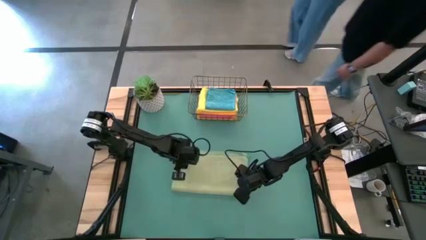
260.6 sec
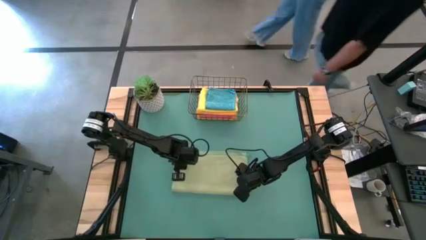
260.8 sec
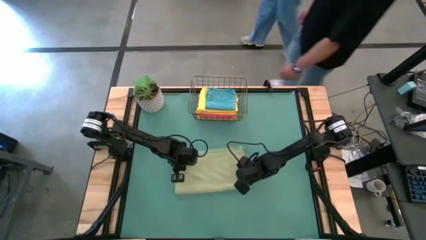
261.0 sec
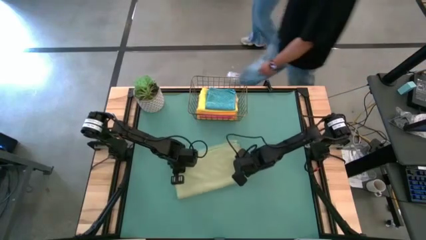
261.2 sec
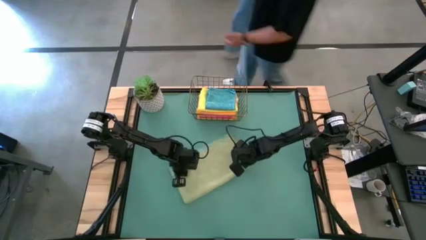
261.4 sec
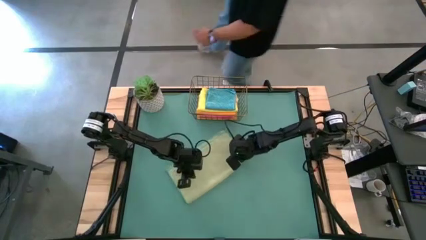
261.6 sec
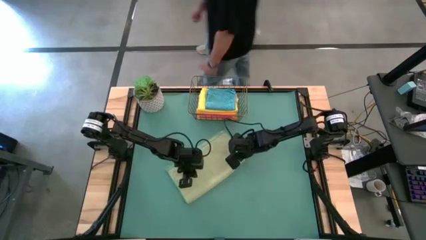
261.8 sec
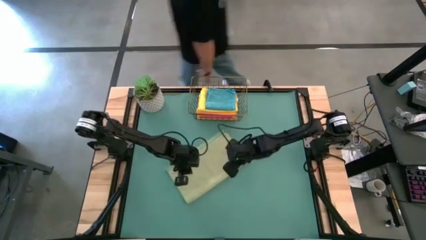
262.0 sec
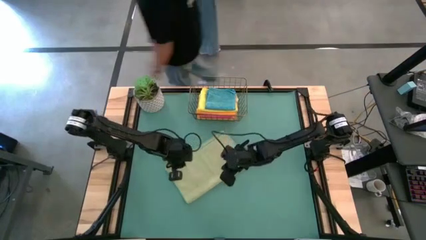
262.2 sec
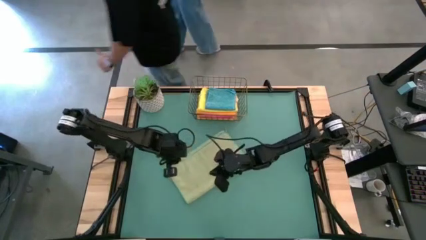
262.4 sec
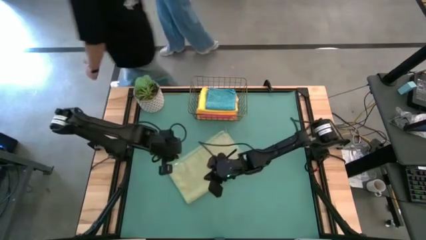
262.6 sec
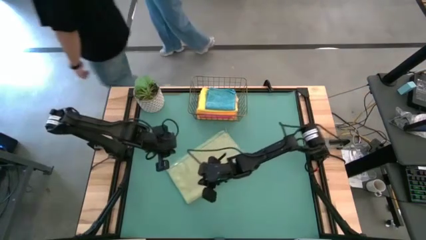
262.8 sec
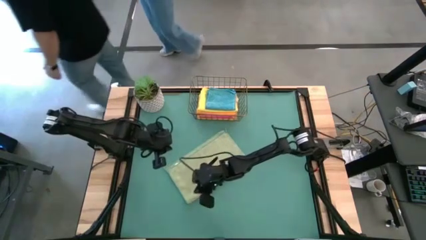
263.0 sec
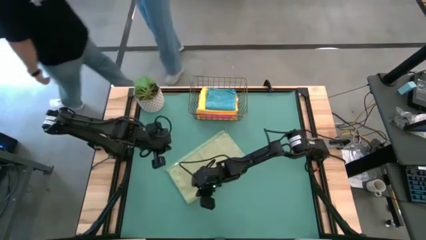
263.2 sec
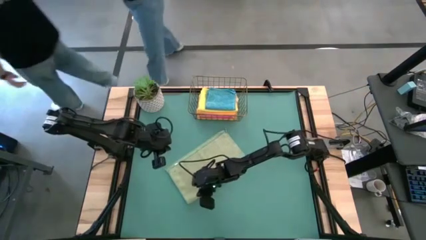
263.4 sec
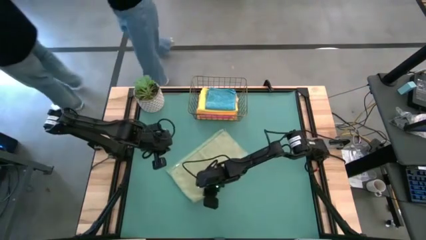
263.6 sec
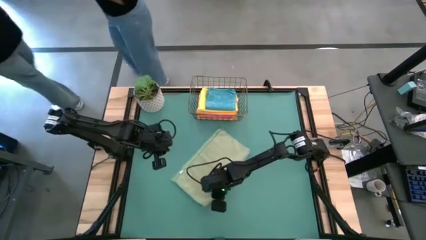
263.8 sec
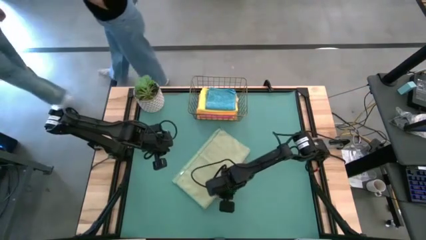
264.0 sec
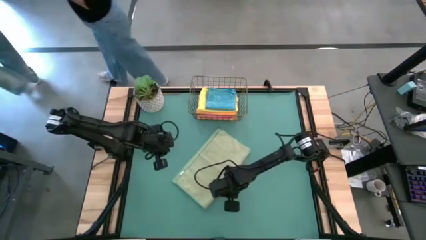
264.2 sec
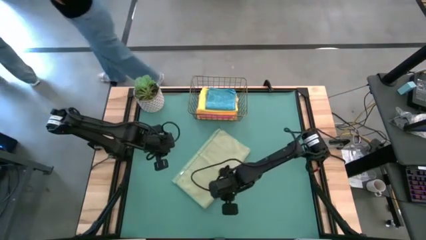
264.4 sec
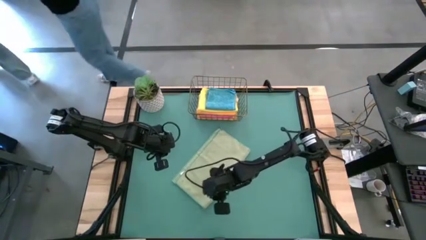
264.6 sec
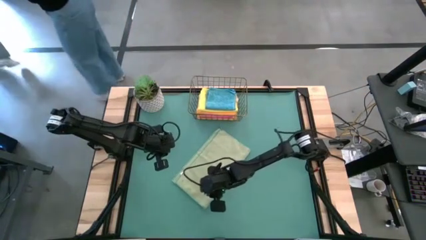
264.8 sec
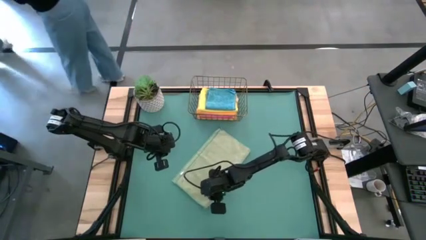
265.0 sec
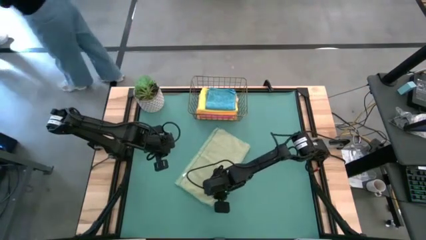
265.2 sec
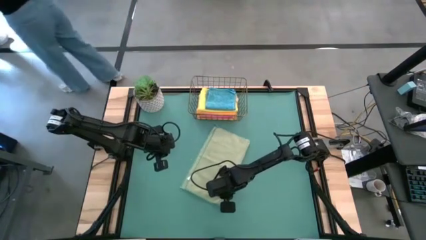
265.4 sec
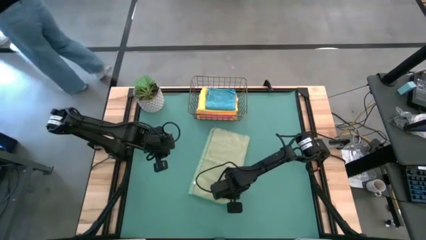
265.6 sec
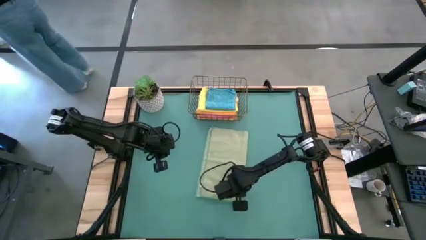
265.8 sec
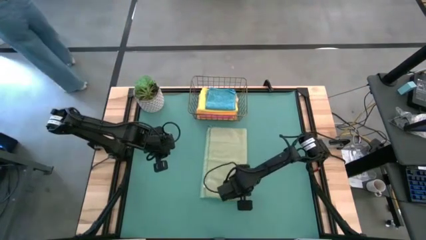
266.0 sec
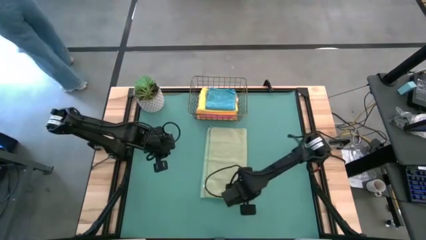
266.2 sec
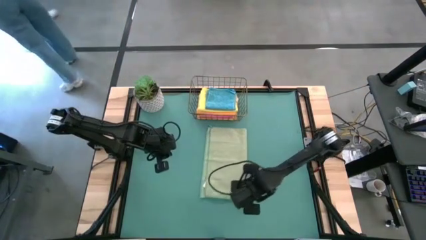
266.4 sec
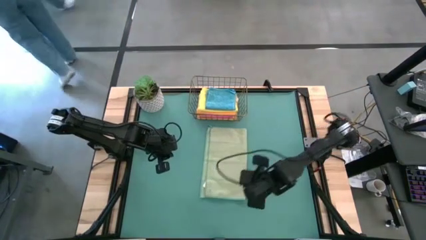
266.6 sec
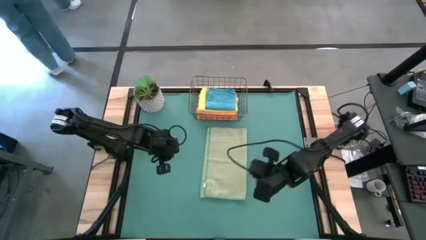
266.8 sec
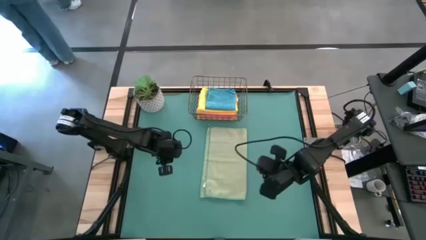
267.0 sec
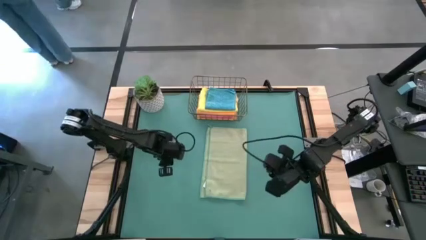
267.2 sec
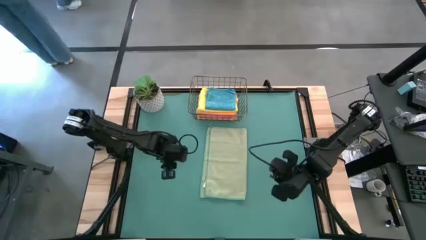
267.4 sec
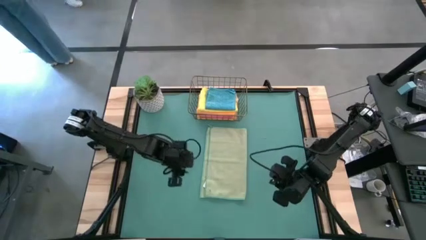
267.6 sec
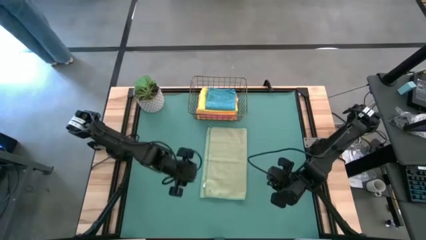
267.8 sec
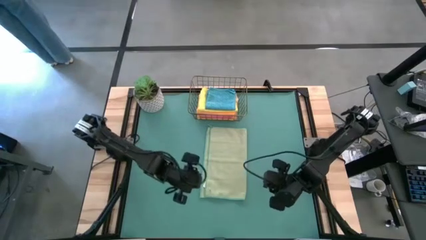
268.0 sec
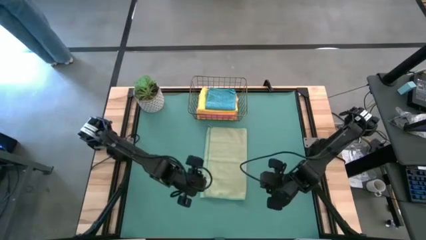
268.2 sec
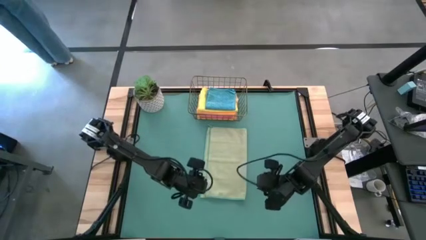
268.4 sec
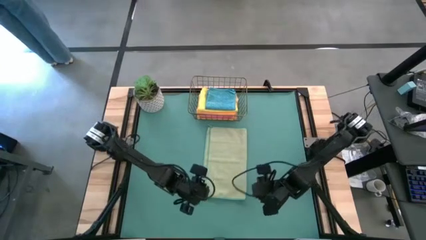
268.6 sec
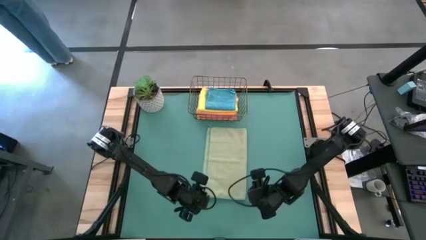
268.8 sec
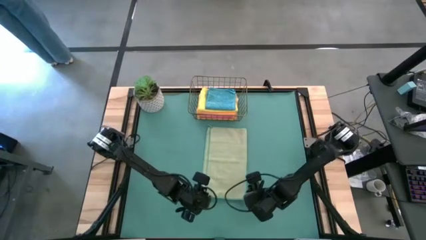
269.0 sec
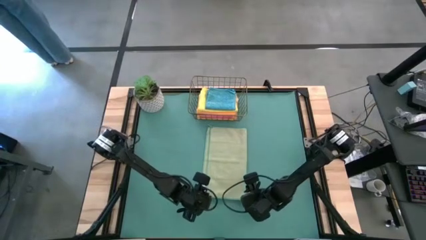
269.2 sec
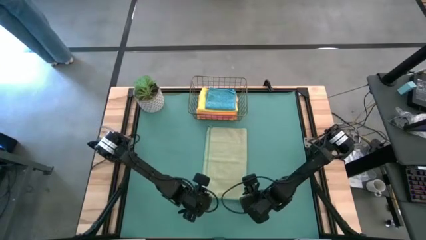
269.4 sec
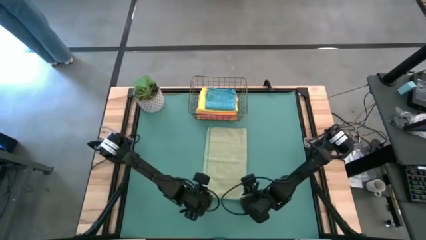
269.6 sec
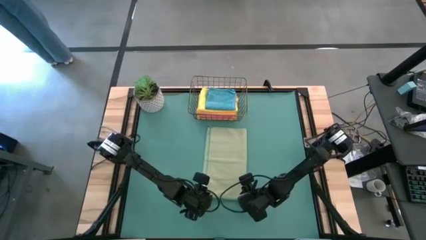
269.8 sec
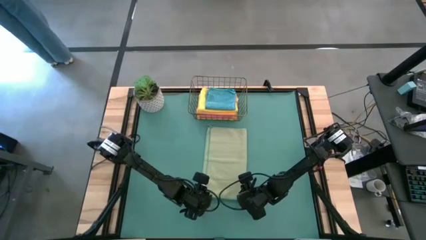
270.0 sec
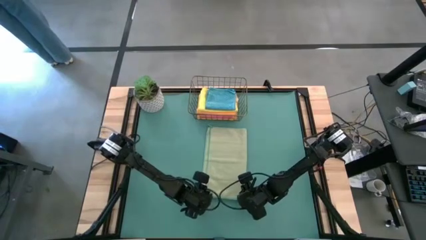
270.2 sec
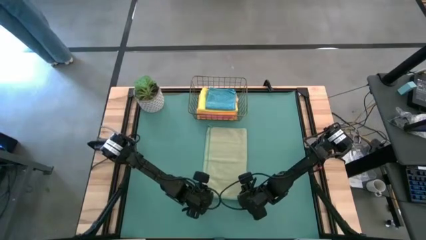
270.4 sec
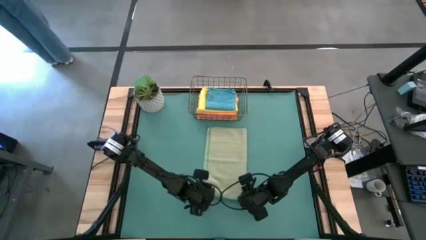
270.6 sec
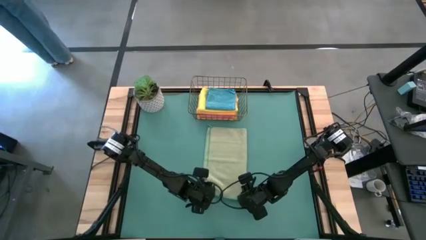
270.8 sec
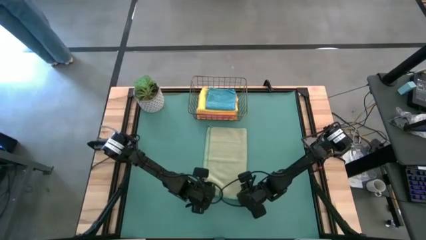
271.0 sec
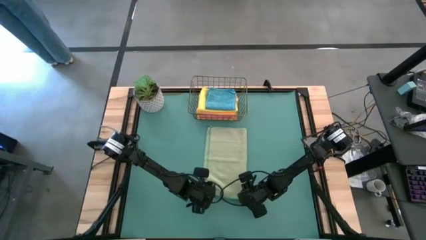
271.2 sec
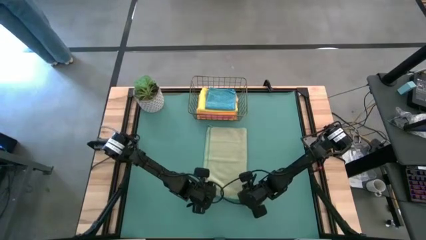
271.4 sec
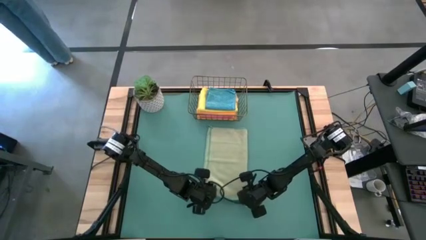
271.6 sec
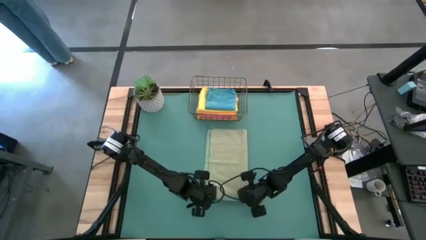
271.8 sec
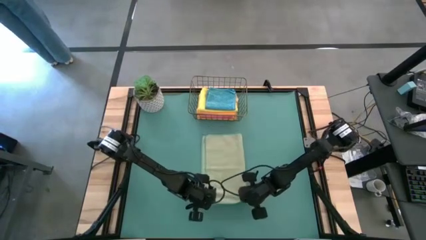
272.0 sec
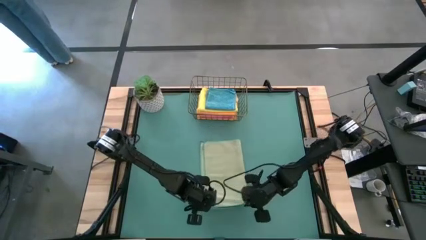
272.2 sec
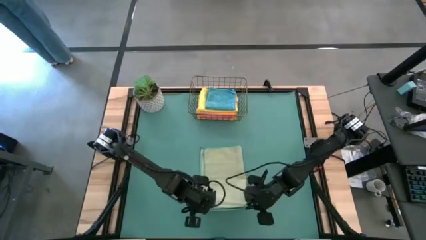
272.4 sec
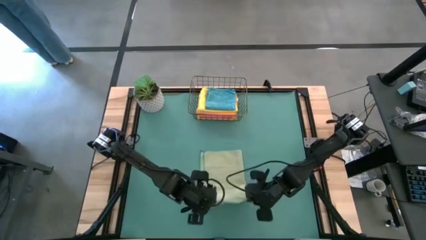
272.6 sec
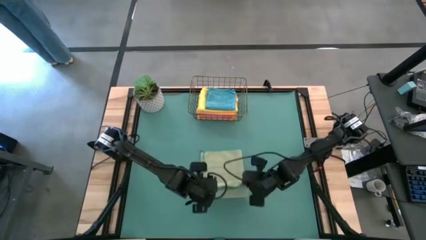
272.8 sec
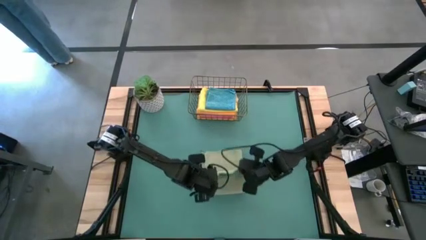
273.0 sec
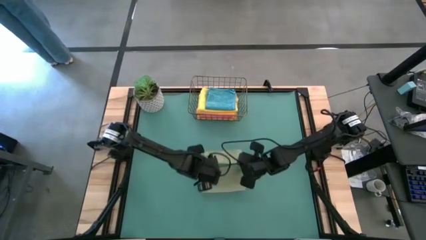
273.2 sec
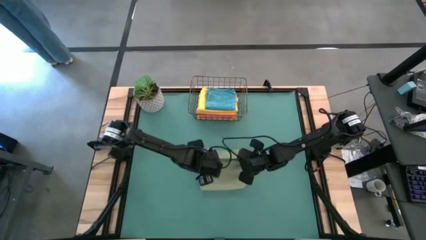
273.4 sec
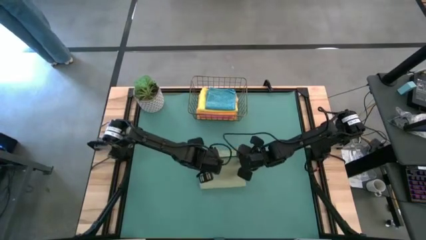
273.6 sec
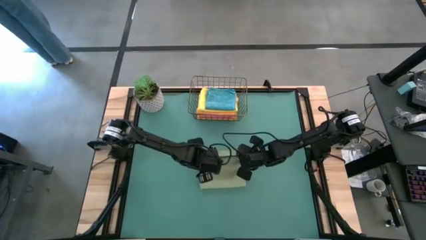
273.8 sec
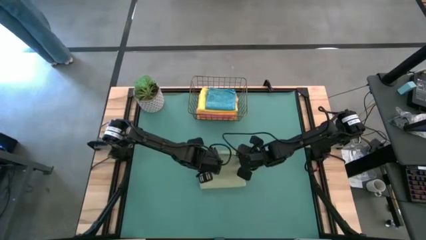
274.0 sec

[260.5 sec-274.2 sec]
Task: Fold microfiber towels
Fold the green microfiber towel

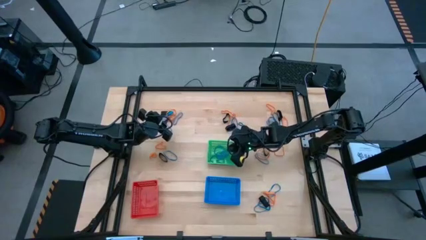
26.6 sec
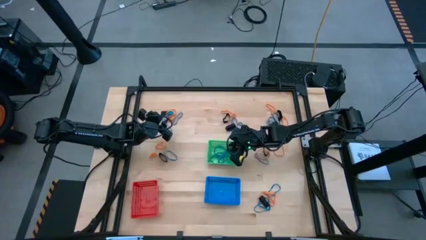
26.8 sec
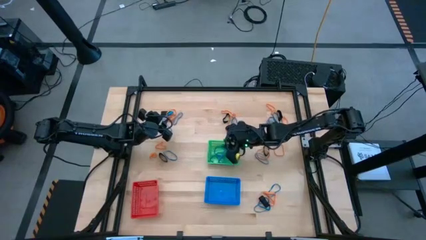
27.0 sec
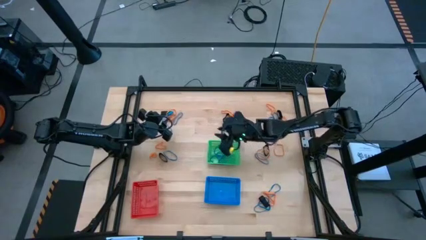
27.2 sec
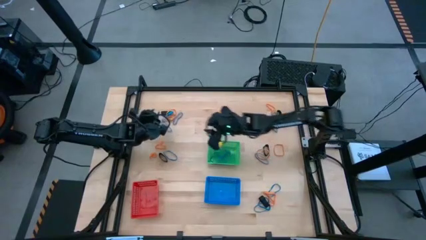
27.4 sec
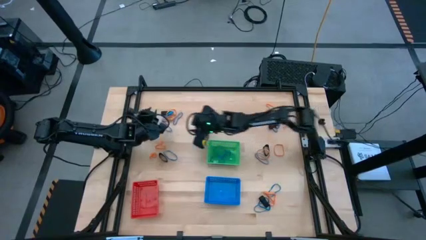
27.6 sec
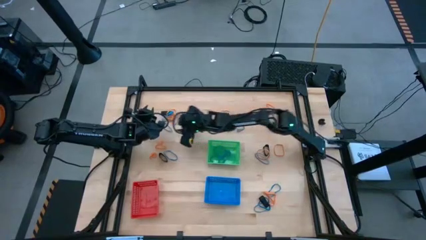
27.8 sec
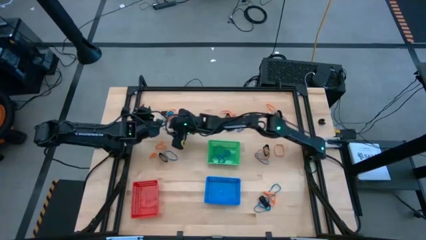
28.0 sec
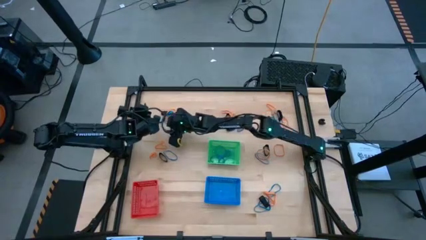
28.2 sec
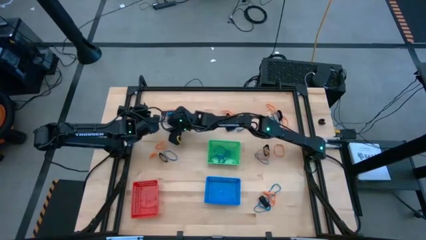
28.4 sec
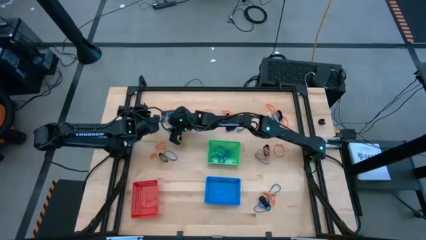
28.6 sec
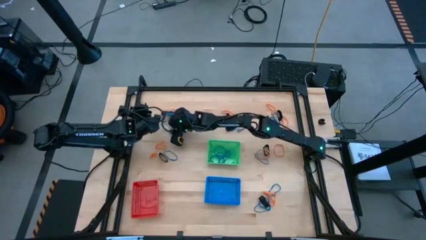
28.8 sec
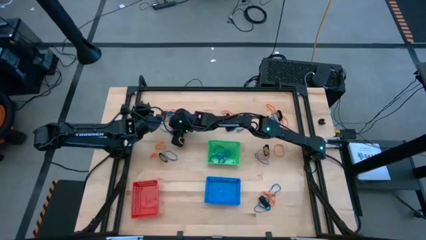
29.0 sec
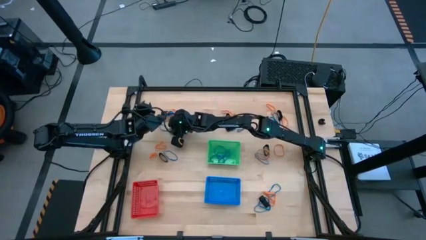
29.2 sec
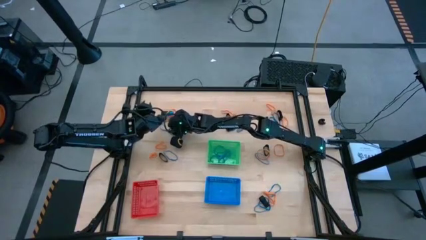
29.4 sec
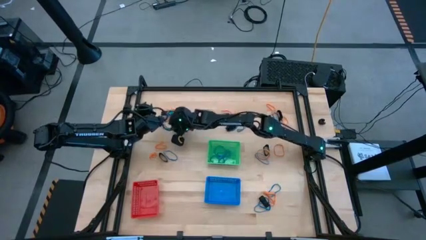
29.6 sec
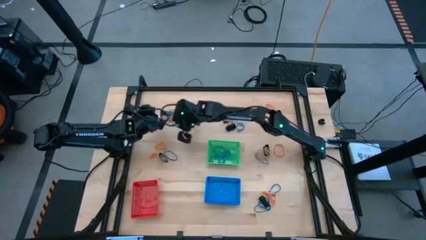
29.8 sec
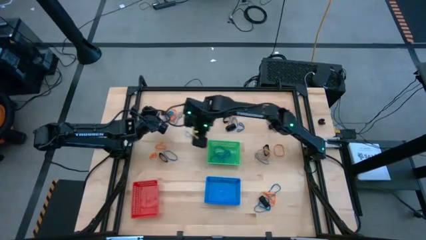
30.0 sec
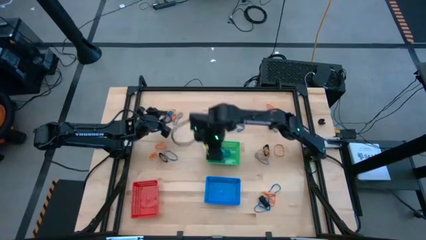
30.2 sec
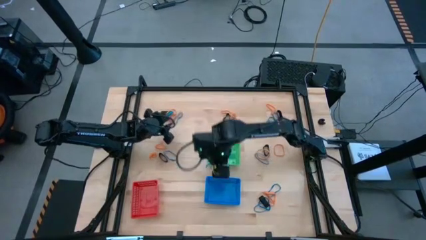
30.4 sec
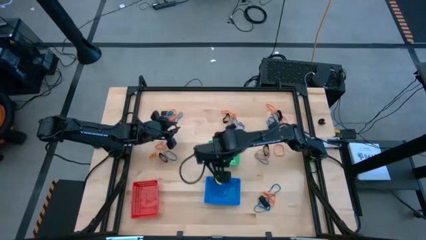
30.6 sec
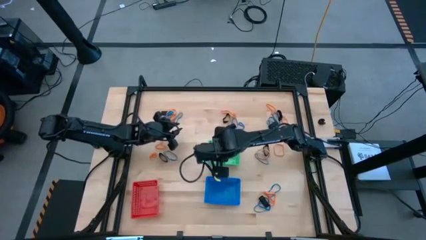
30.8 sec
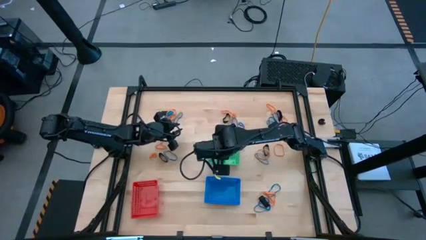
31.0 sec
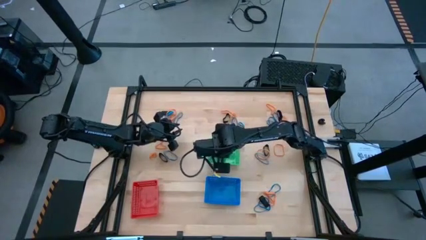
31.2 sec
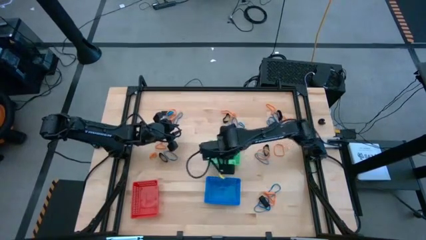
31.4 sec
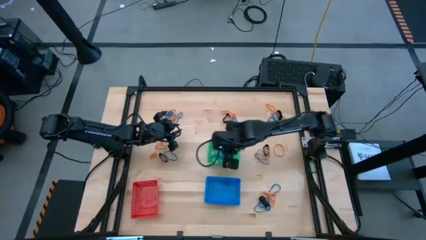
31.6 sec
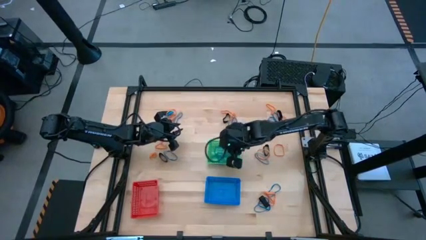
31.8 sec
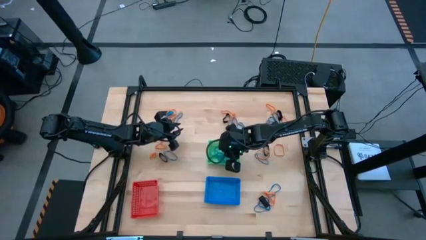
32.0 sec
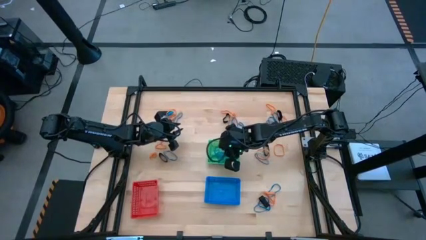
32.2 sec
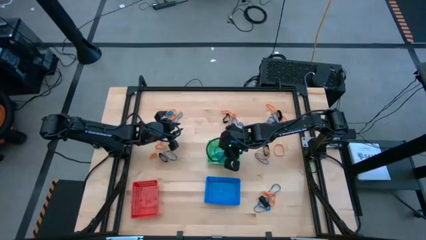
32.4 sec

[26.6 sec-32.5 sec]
Task: Sort rubber bands into baskets
Put the blue rubberband into the green bin
